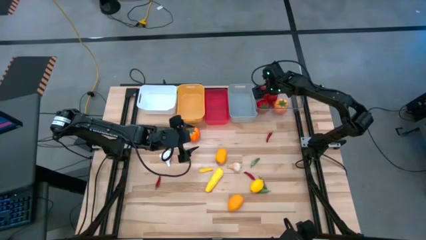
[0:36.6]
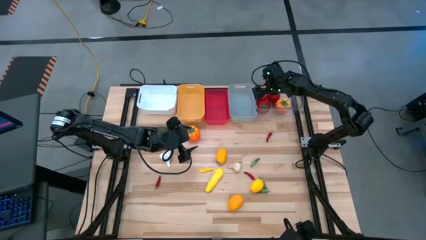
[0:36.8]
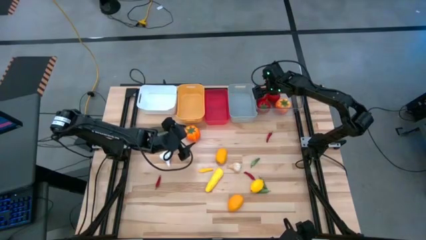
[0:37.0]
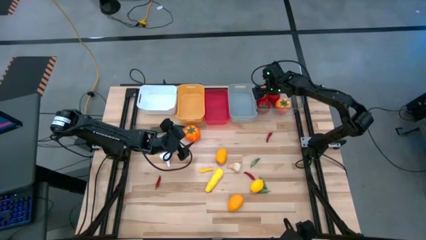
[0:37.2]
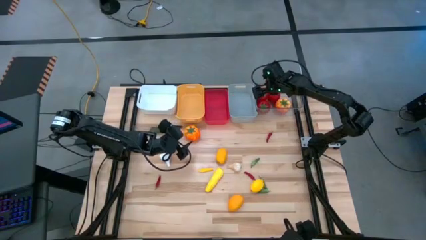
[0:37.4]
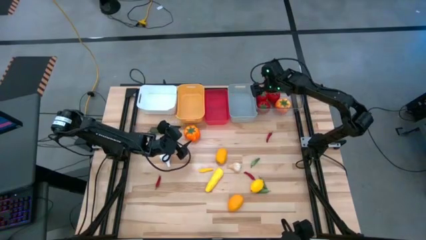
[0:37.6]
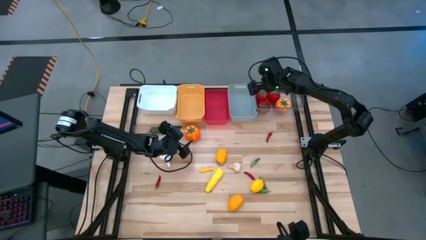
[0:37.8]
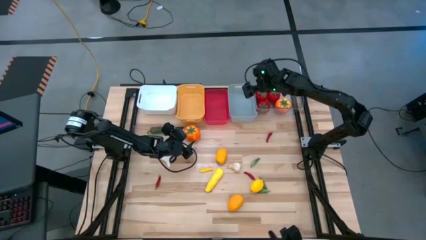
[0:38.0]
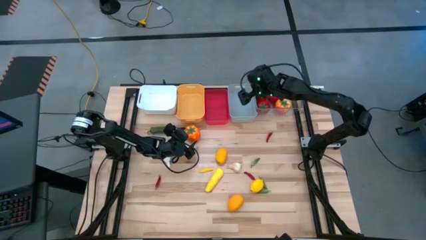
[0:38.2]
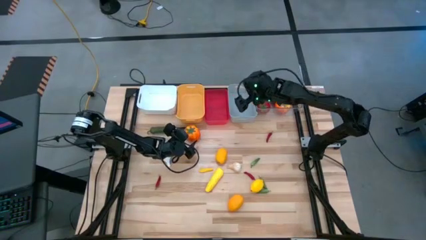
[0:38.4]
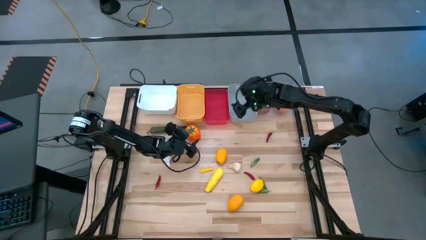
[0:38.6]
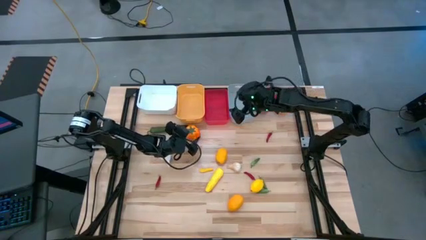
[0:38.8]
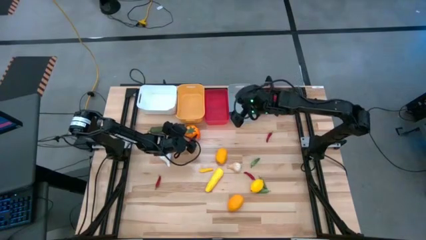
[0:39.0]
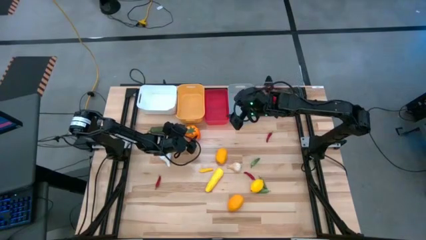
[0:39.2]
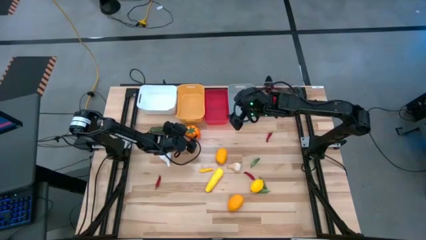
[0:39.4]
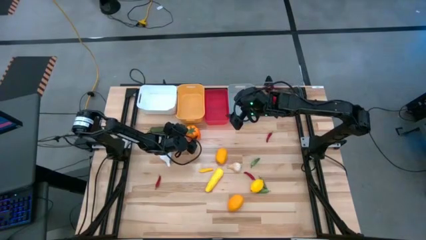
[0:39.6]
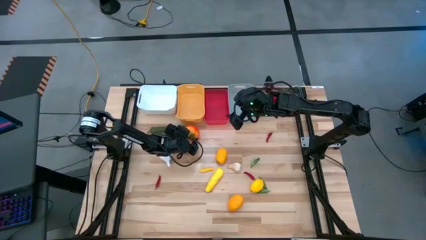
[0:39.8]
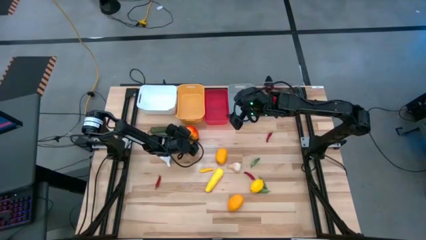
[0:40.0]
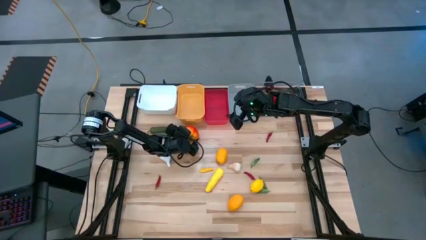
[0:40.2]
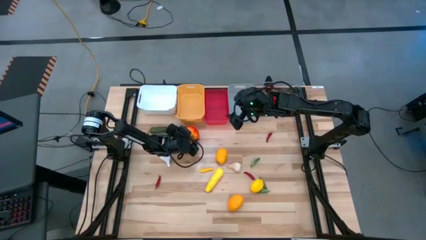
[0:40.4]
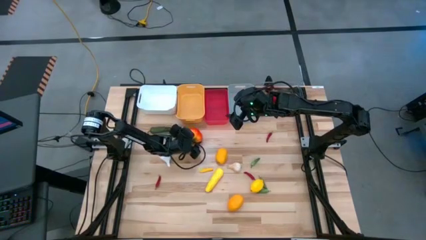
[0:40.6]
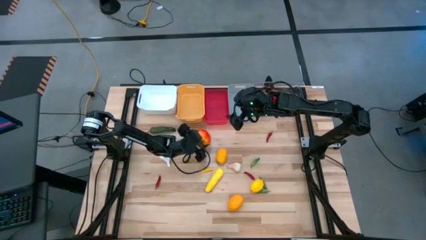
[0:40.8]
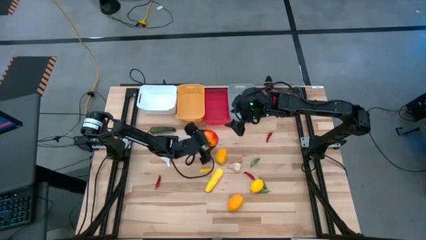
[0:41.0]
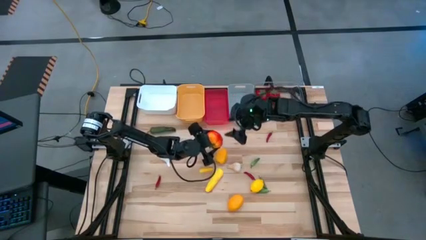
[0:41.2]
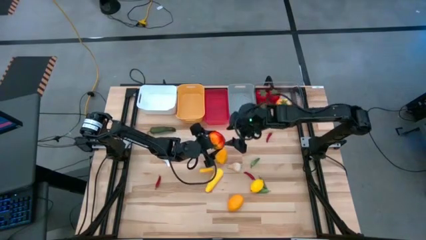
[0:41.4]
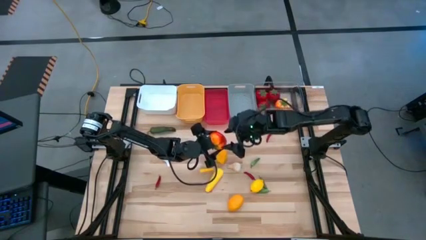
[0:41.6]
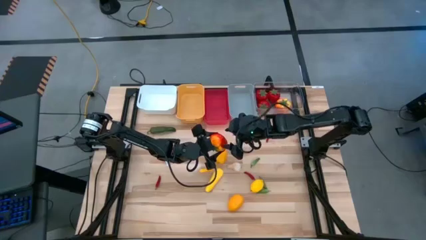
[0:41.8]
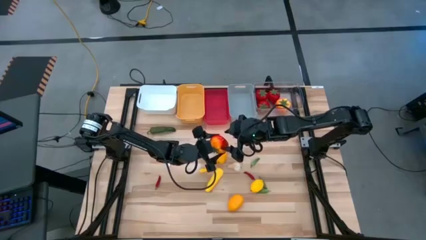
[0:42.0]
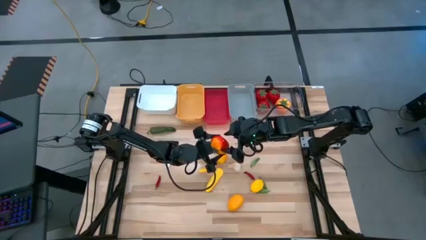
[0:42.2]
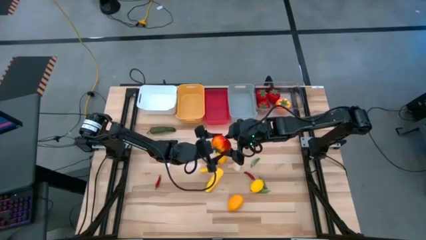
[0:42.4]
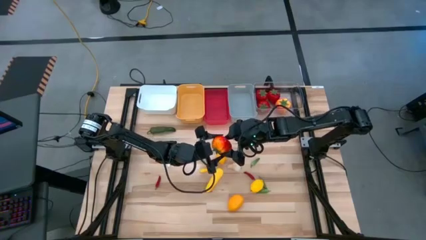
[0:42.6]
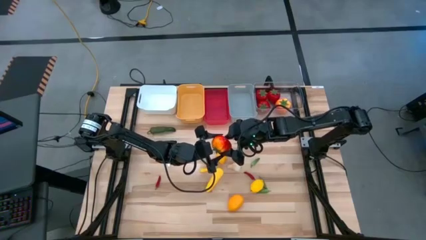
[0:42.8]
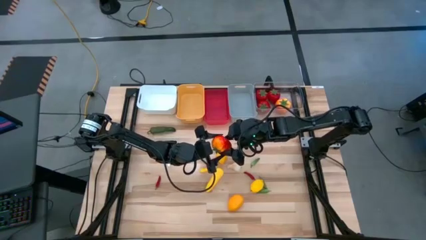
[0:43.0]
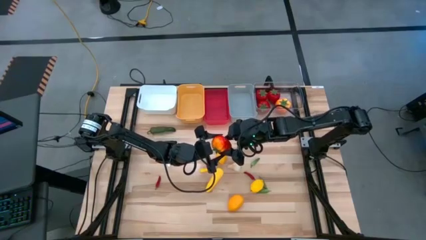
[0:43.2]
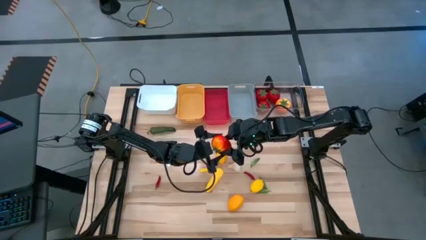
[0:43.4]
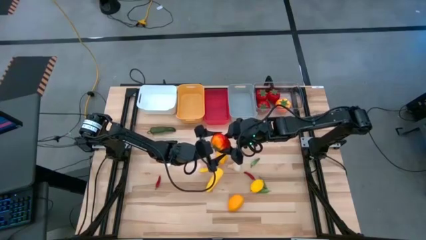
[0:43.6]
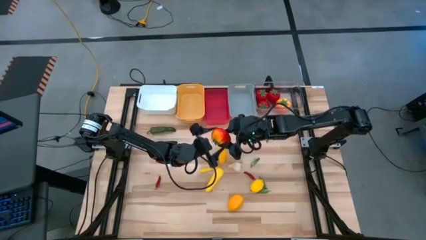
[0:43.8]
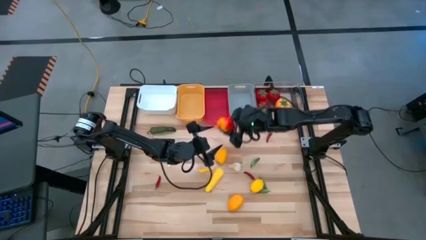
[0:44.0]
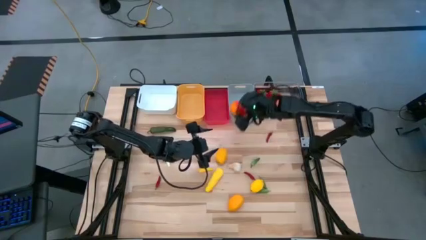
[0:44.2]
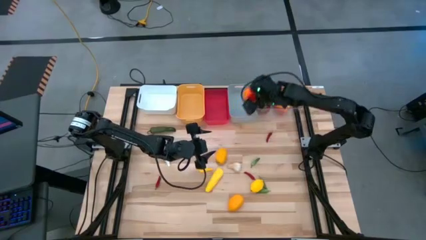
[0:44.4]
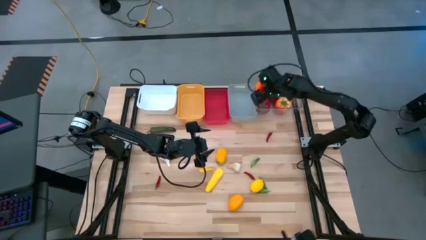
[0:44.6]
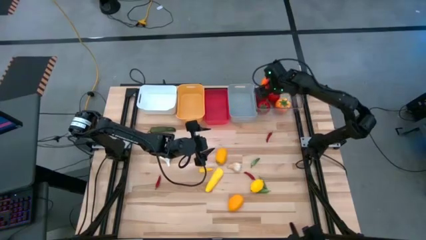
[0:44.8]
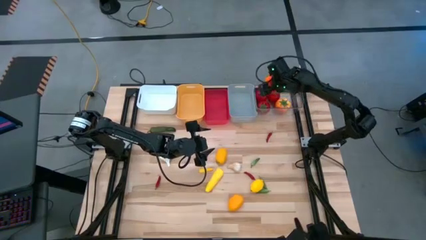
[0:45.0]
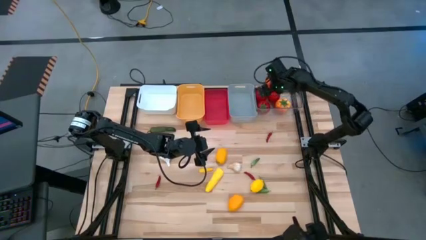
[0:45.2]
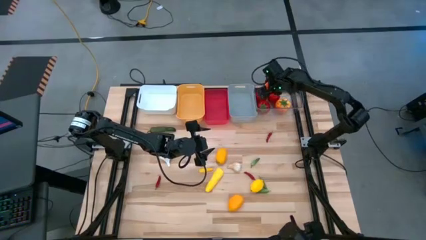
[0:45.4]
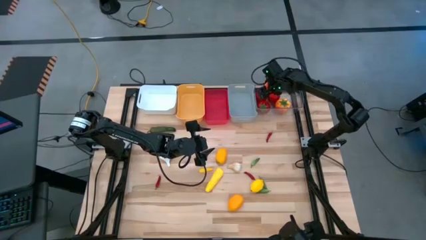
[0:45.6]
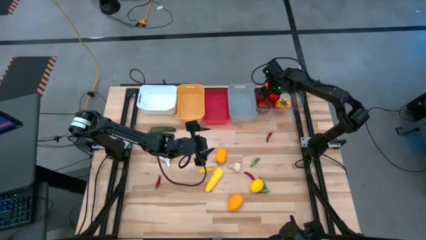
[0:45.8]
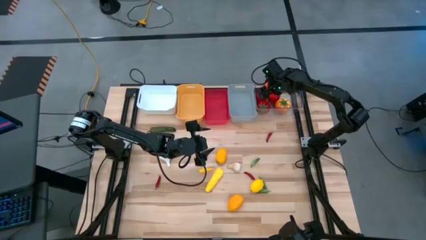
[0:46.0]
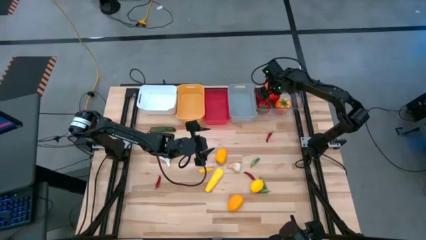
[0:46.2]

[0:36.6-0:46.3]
Task: Sort produce into baskets
Put the orange tomato into the transparent bin

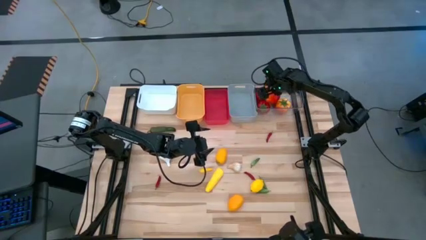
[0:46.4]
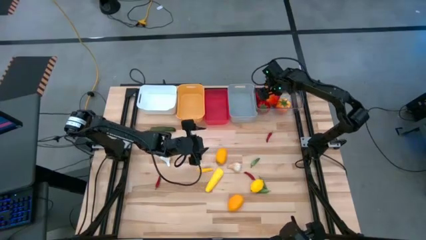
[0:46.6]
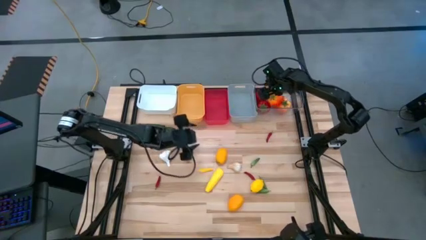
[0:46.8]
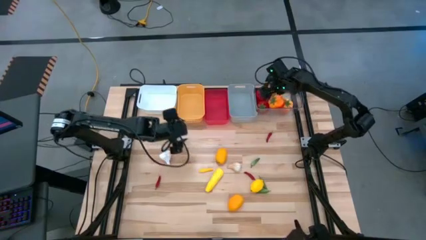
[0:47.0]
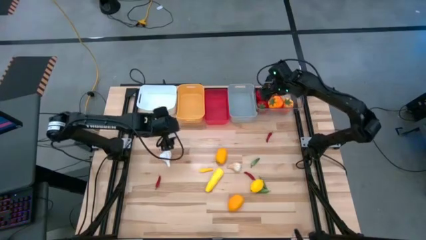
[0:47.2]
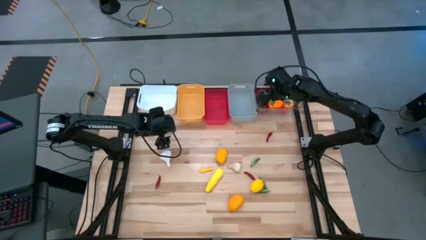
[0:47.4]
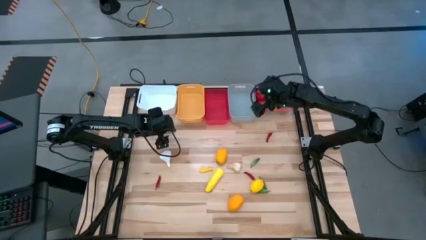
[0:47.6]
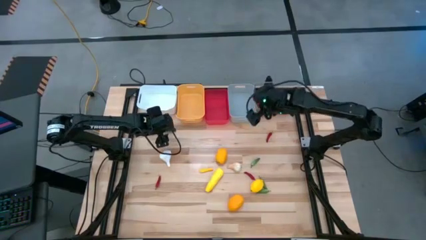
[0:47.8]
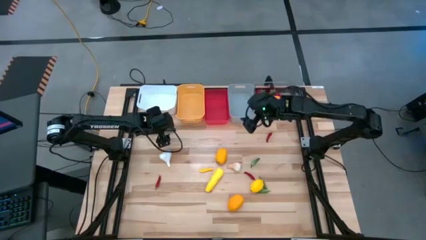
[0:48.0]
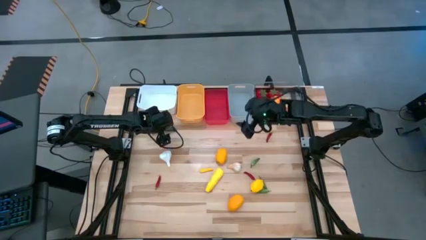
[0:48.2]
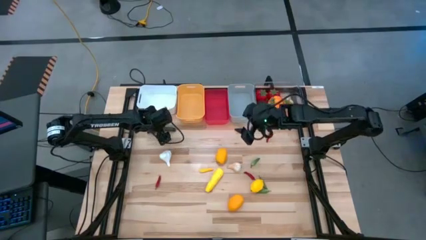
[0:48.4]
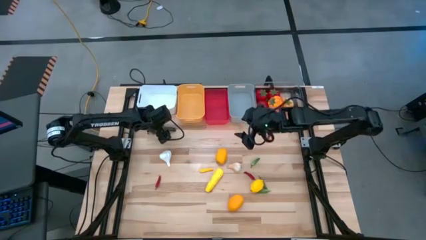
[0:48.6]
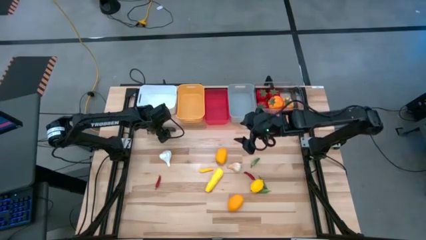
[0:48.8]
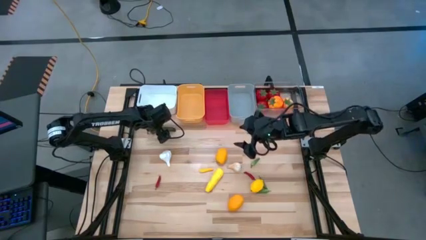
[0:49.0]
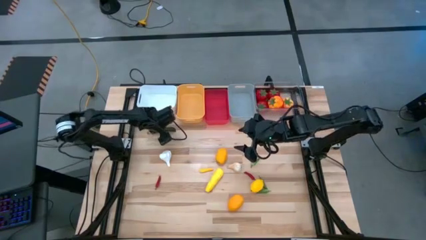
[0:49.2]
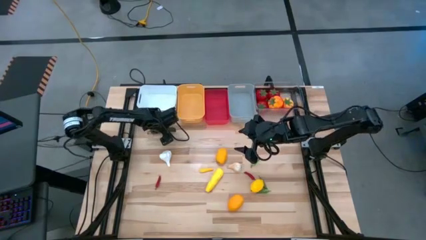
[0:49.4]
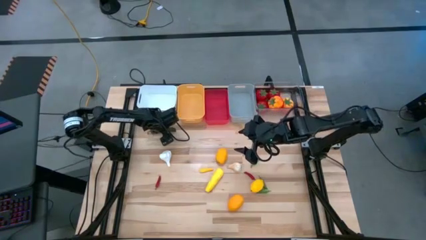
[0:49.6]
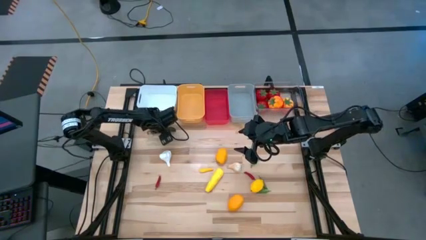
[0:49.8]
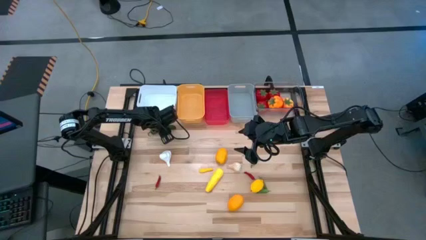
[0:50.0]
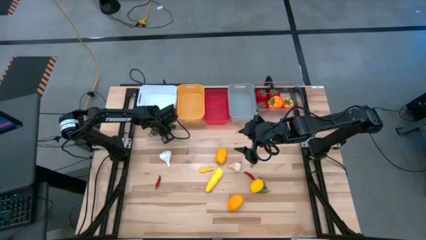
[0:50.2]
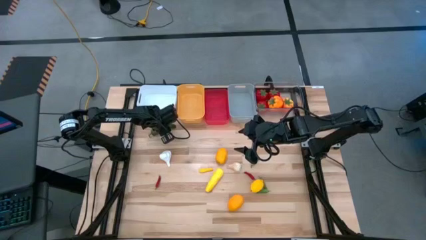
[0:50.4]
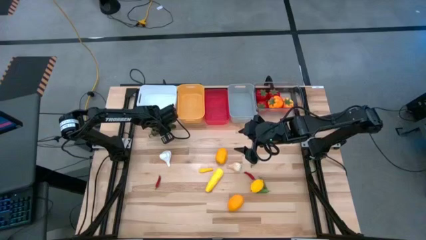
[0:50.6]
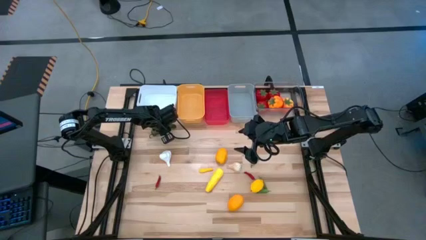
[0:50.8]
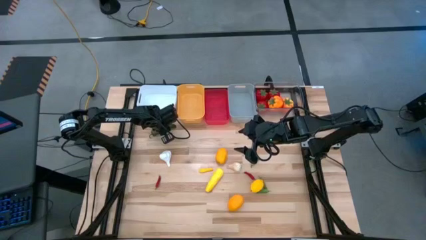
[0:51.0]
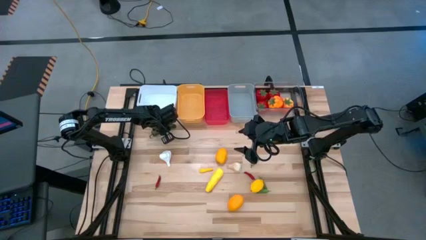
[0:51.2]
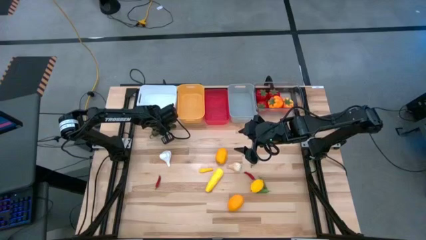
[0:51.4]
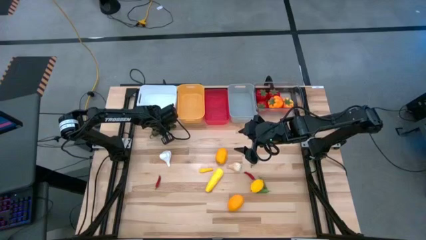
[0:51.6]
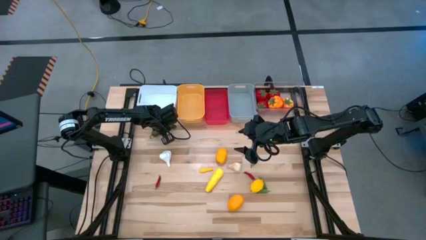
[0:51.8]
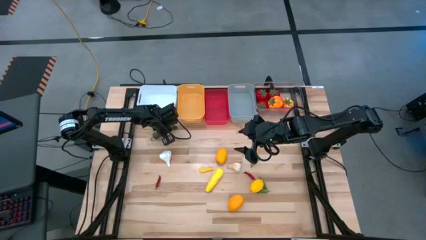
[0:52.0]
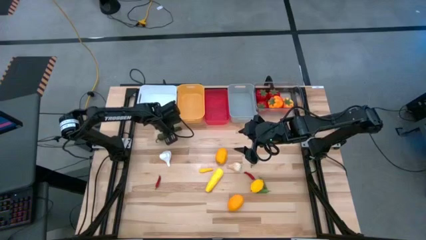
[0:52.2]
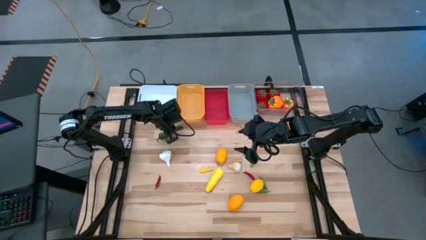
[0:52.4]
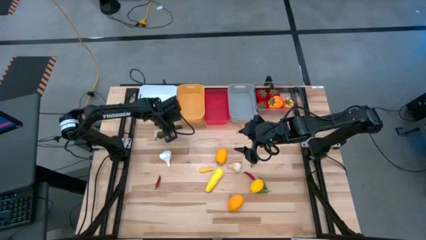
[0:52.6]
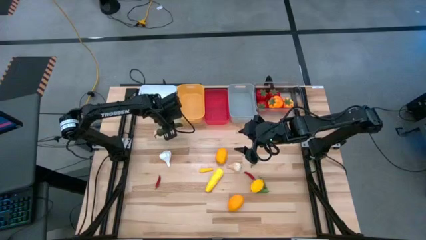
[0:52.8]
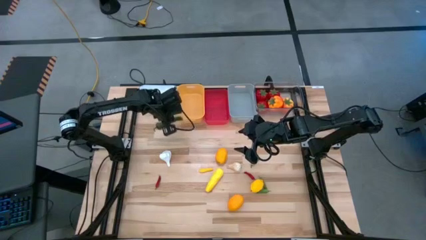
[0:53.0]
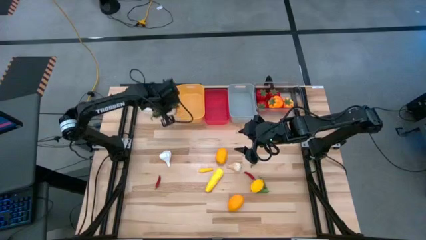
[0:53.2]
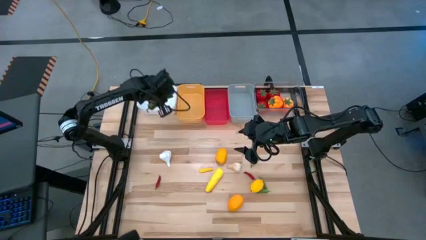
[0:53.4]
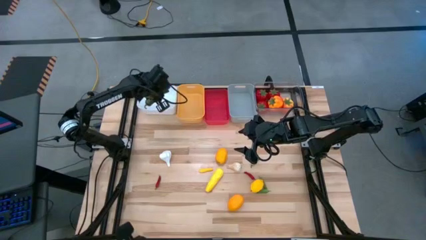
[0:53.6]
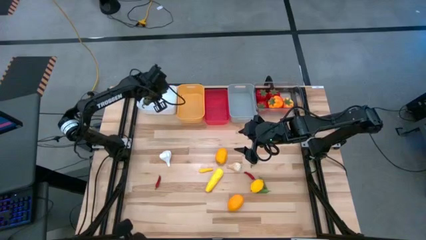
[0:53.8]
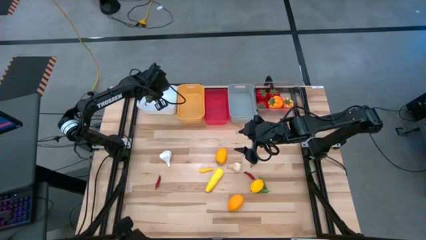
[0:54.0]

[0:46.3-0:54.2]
Put the green chili pepper into the white bin
